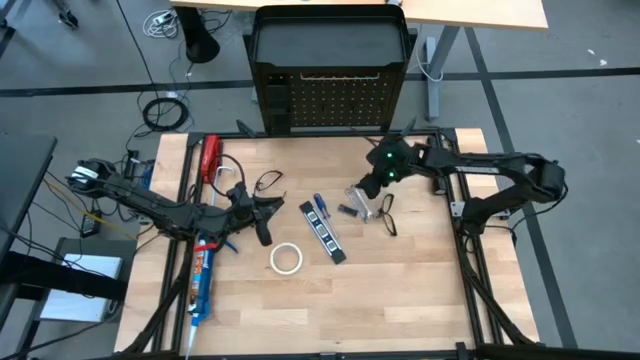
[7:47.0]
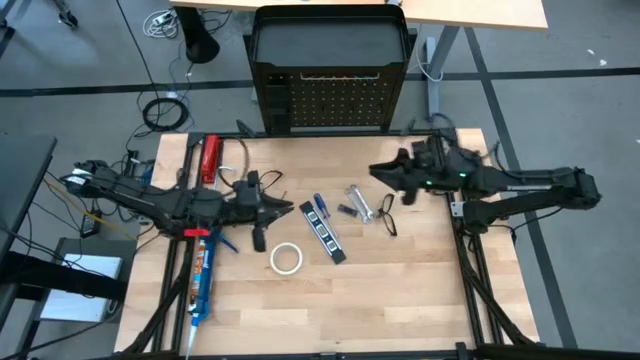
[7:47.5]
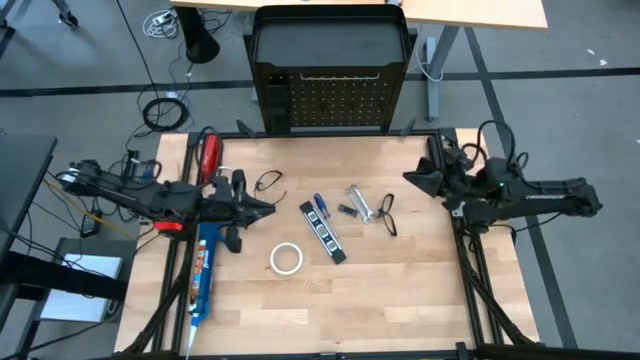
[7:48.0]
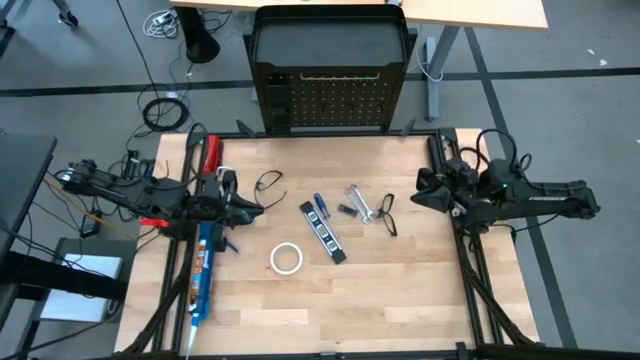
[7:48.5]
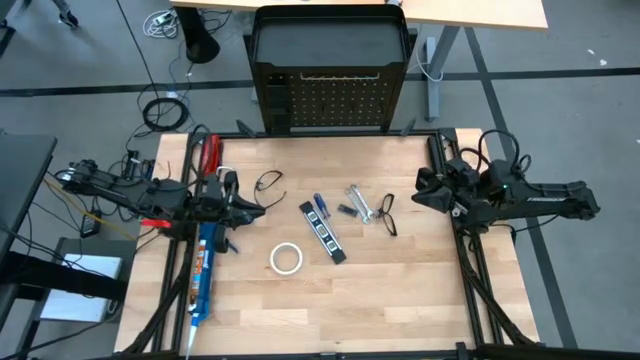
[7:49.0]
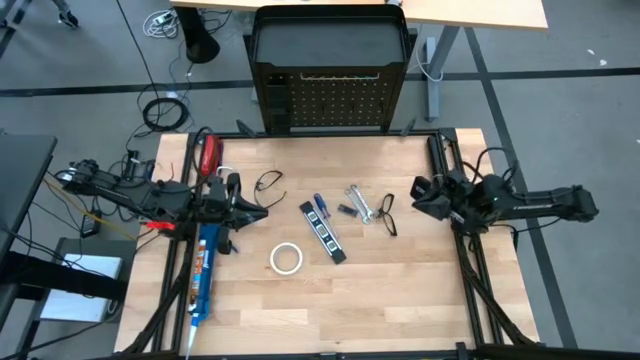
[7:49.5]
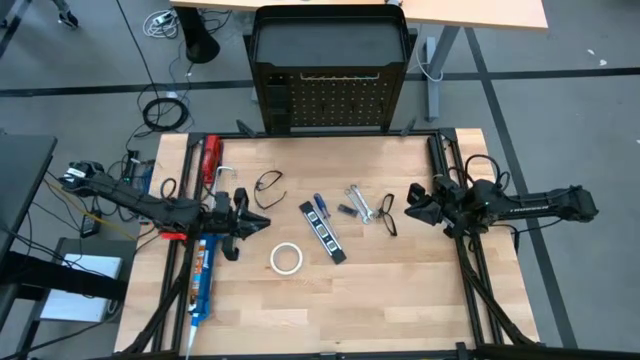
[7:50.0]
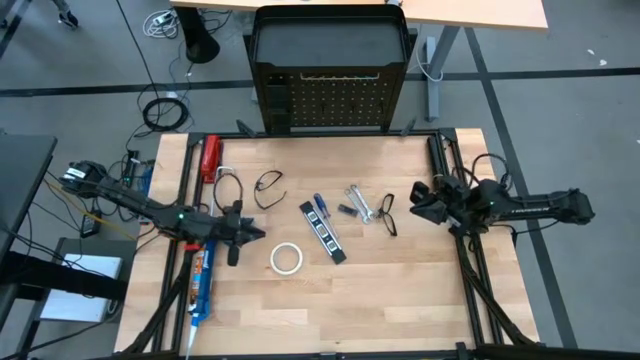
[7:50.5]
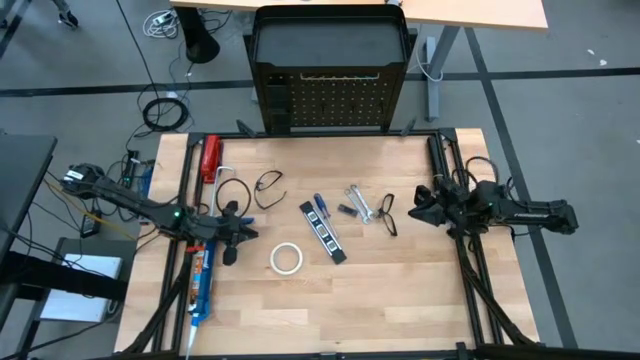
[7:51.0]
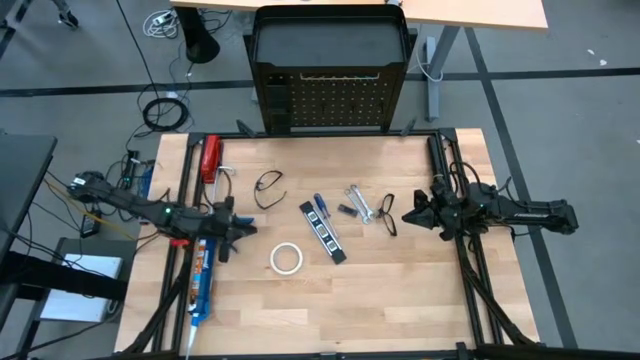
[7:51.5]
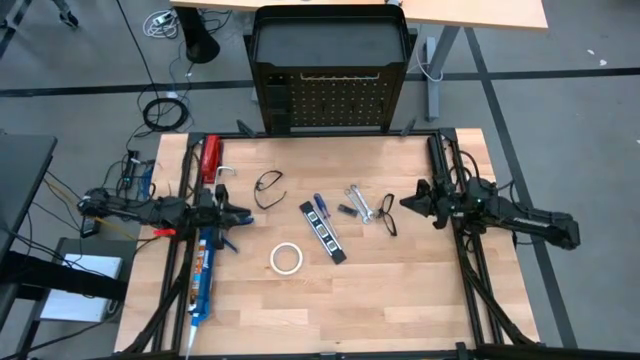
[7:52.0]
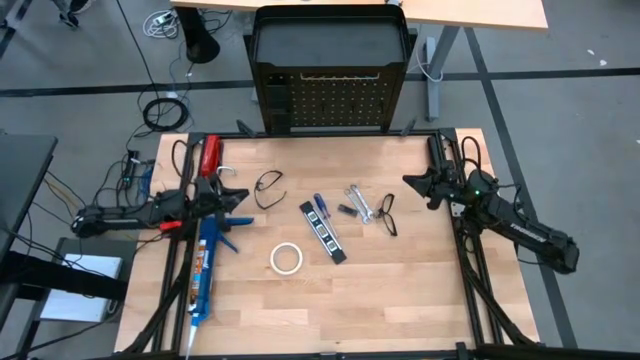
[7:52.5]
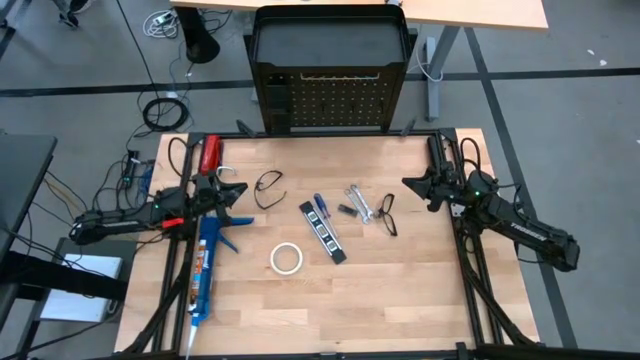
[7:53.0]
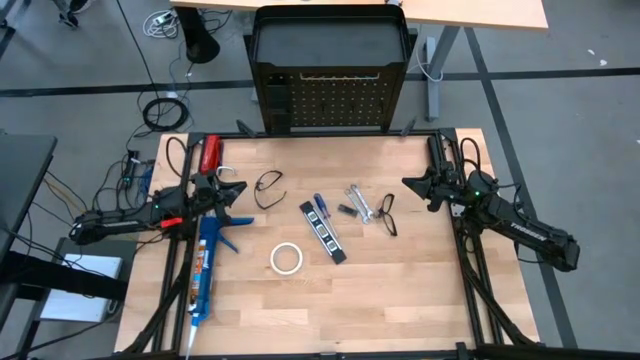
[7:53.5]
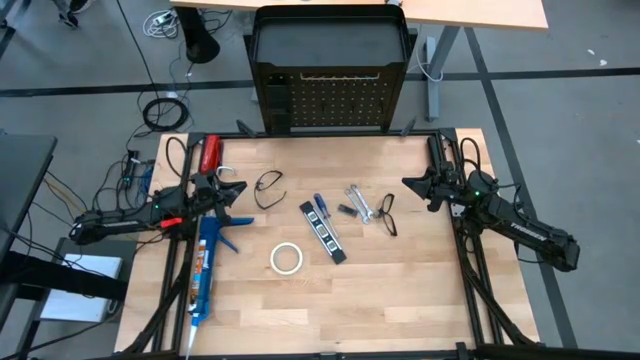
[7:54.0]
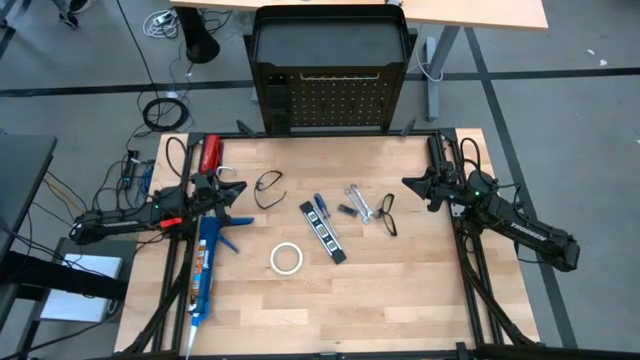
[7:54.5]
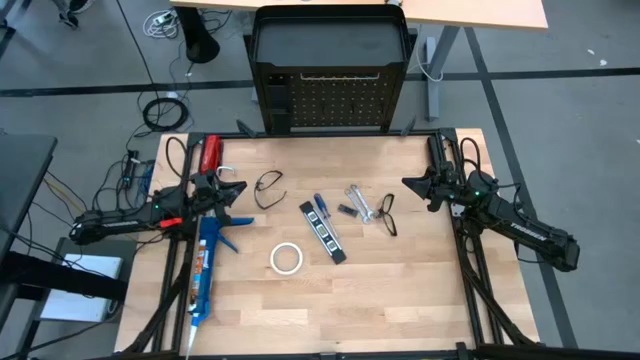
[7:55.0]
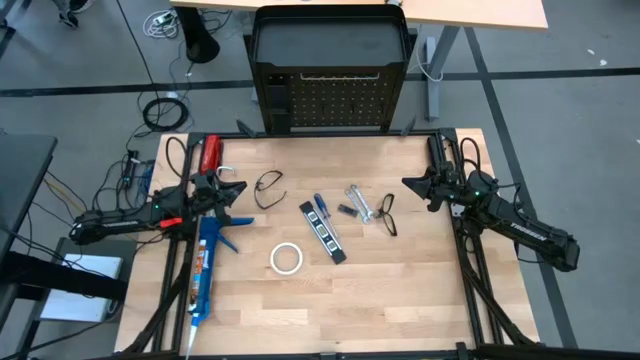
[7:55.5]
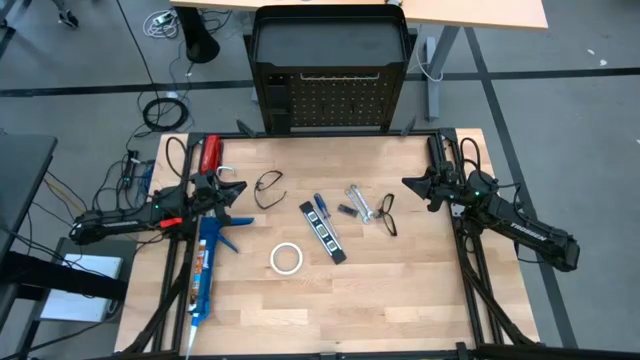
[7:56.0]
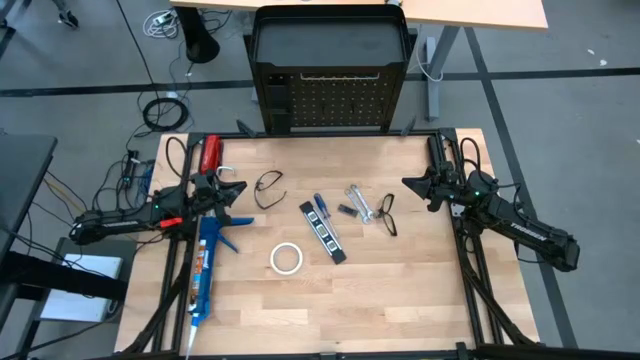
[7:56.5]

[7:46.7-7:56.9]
Task: Hang tools onto peg board
Return to Home Position

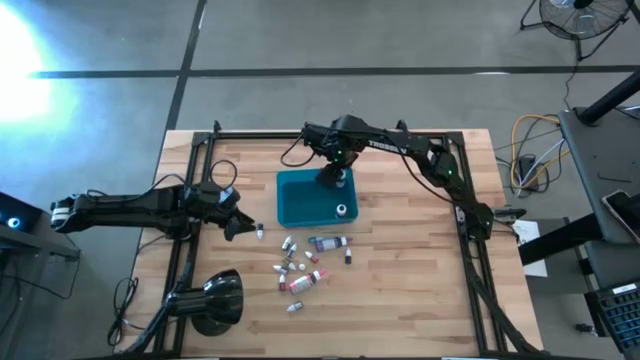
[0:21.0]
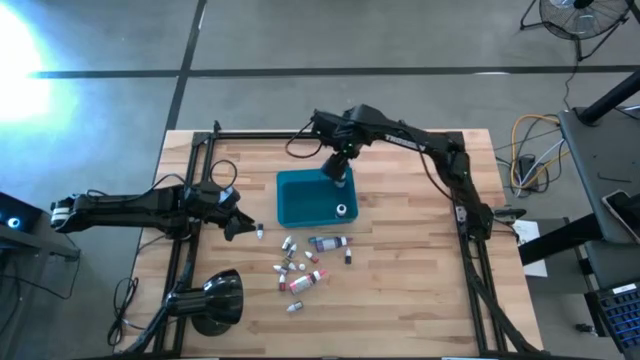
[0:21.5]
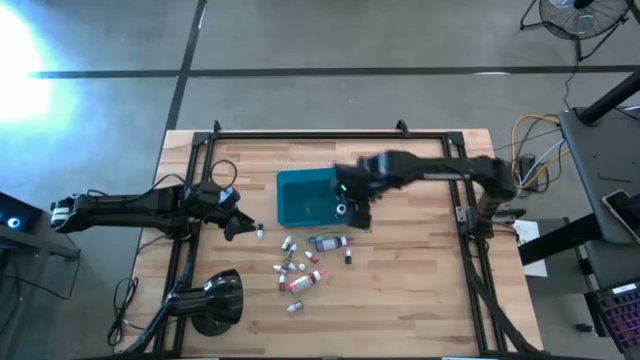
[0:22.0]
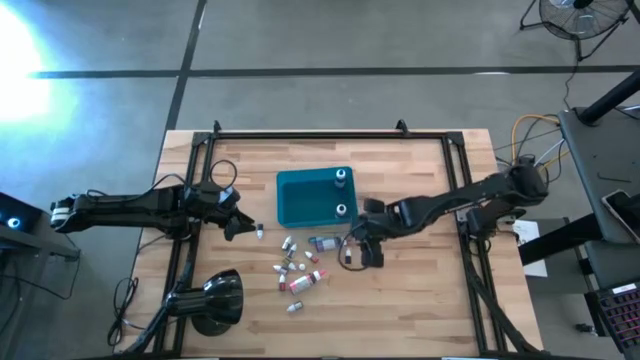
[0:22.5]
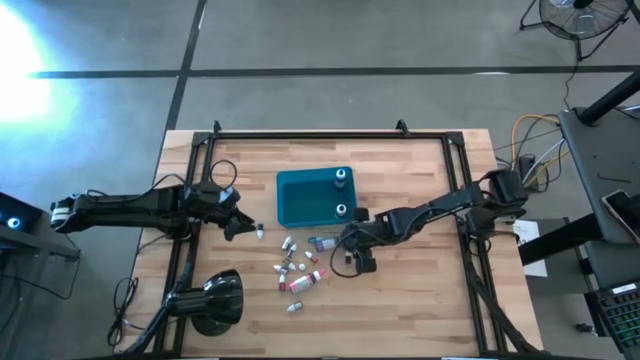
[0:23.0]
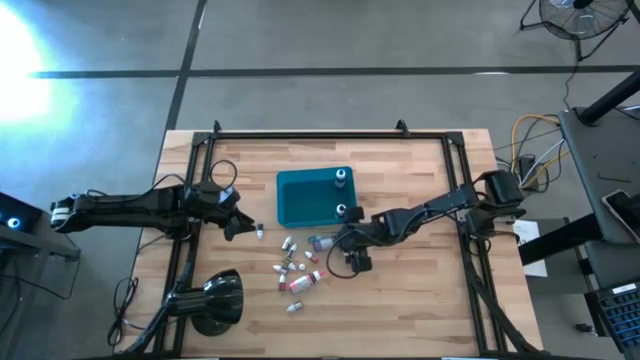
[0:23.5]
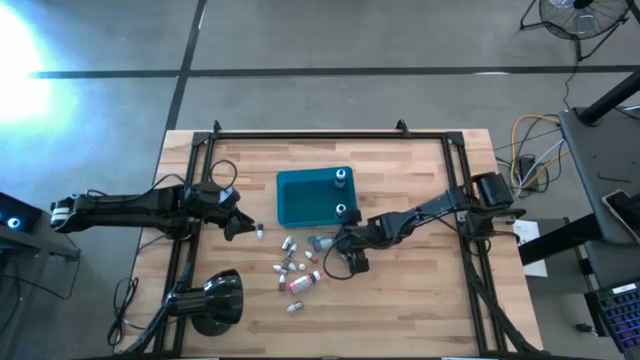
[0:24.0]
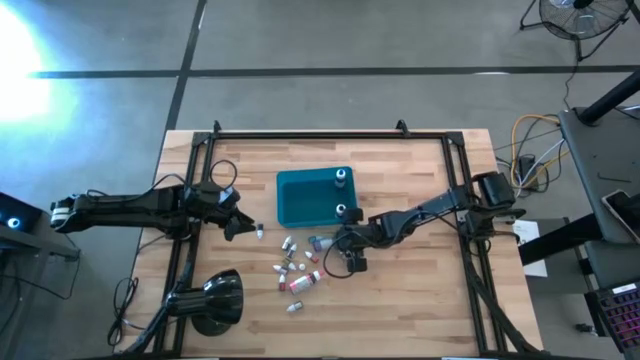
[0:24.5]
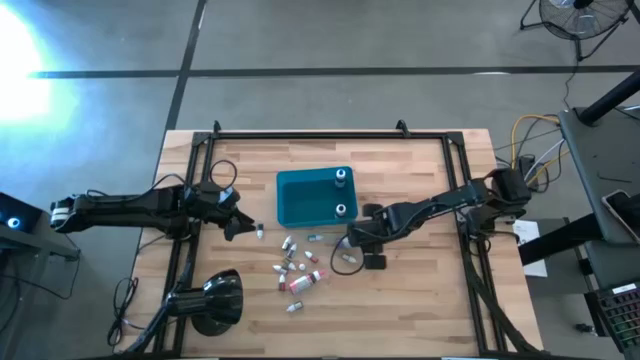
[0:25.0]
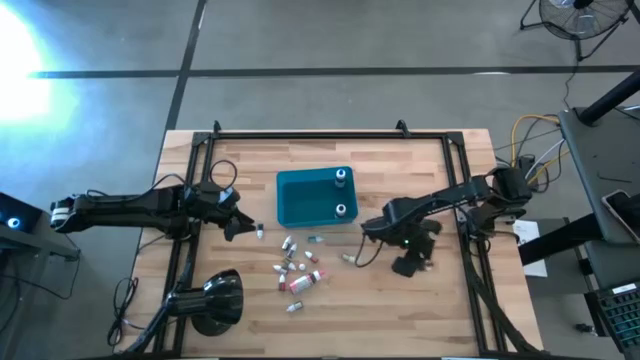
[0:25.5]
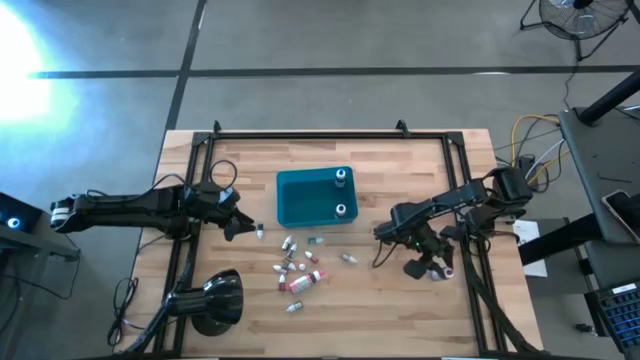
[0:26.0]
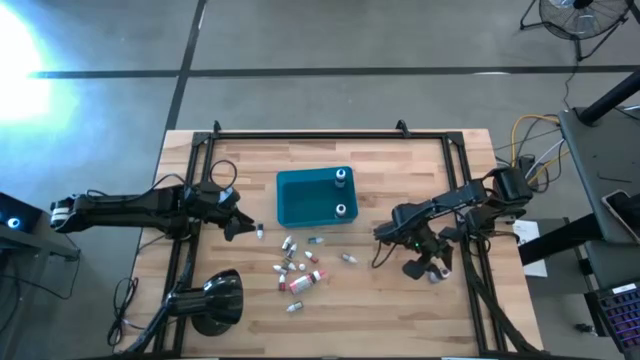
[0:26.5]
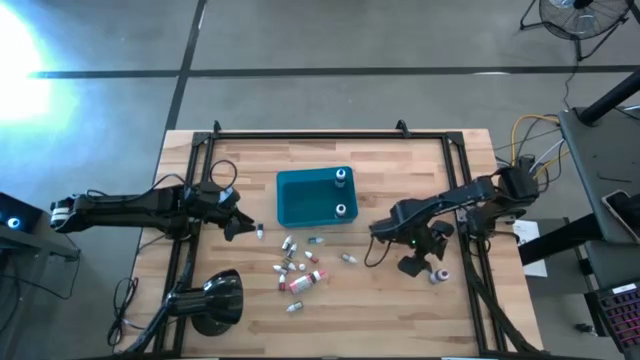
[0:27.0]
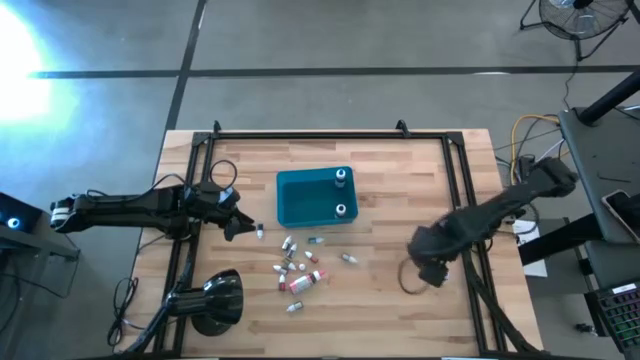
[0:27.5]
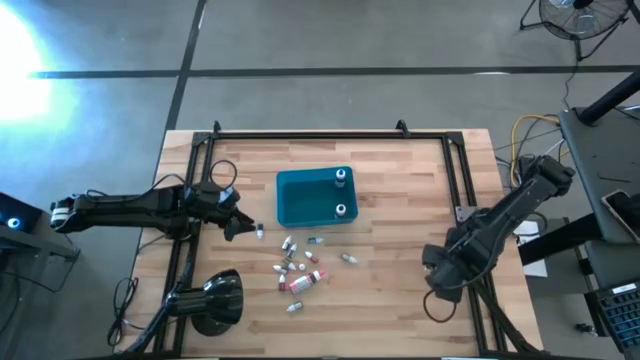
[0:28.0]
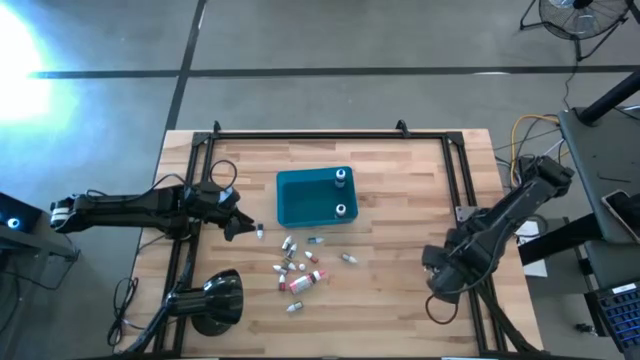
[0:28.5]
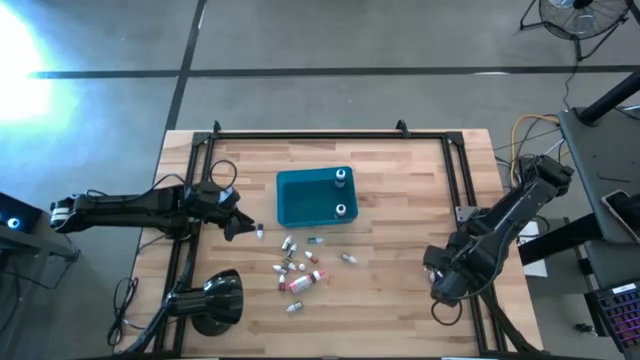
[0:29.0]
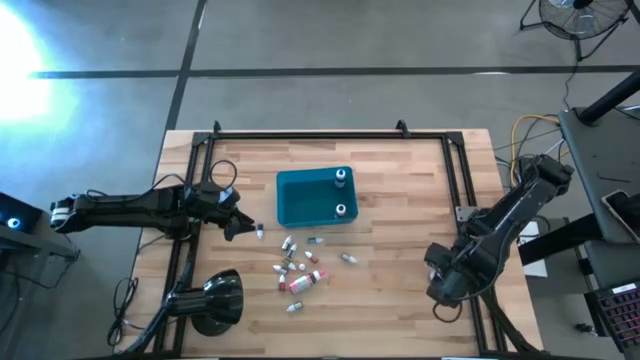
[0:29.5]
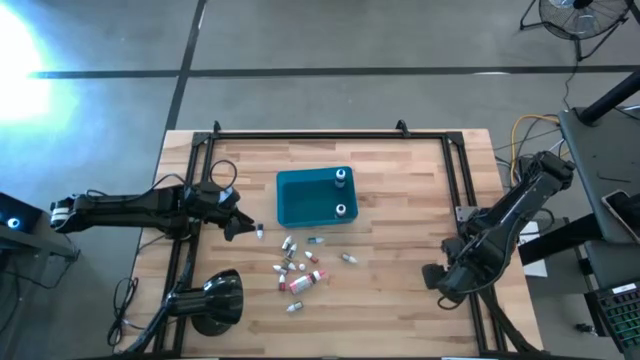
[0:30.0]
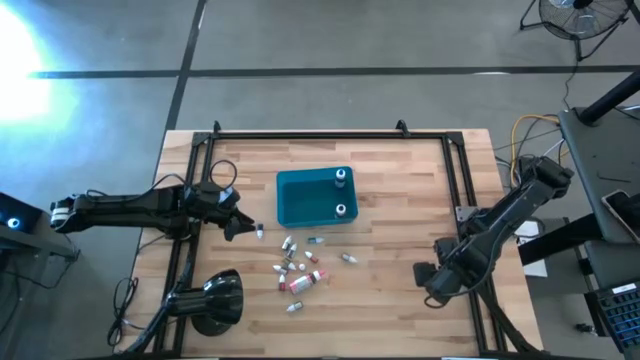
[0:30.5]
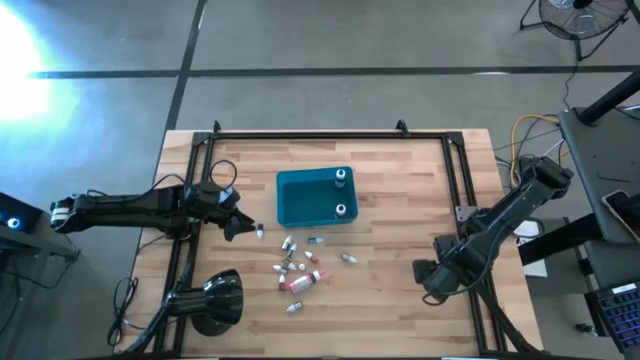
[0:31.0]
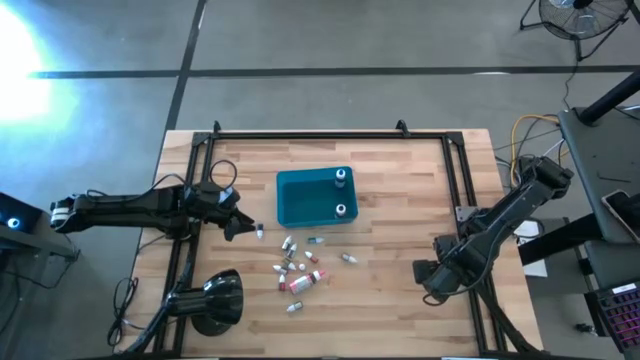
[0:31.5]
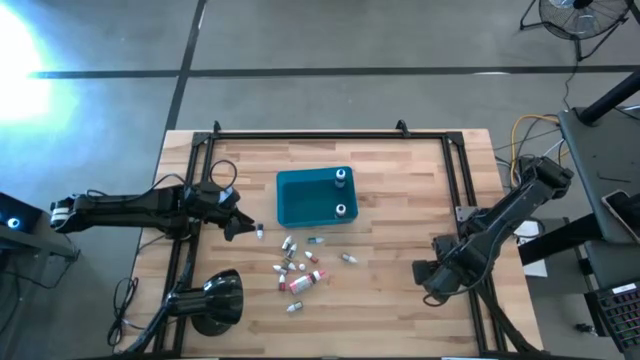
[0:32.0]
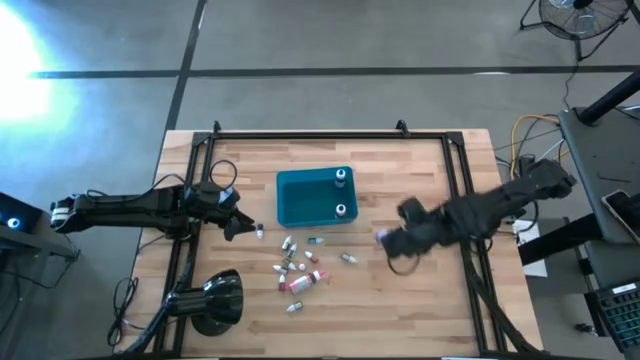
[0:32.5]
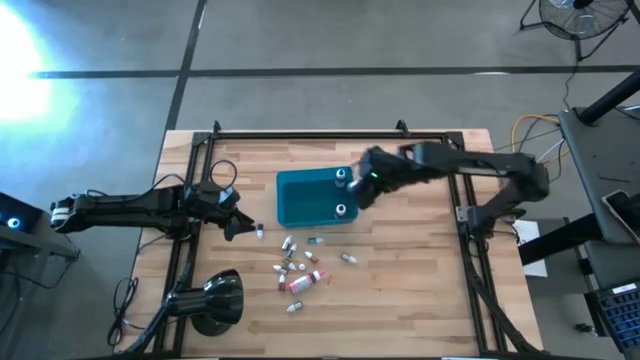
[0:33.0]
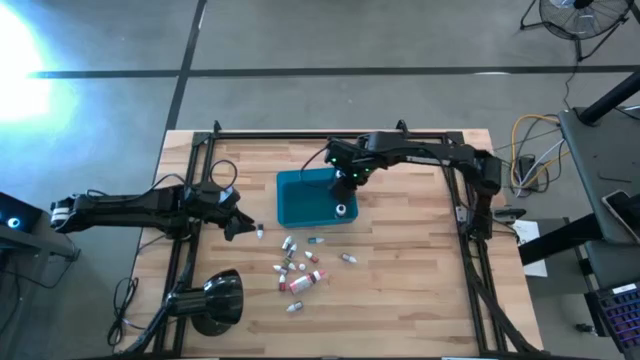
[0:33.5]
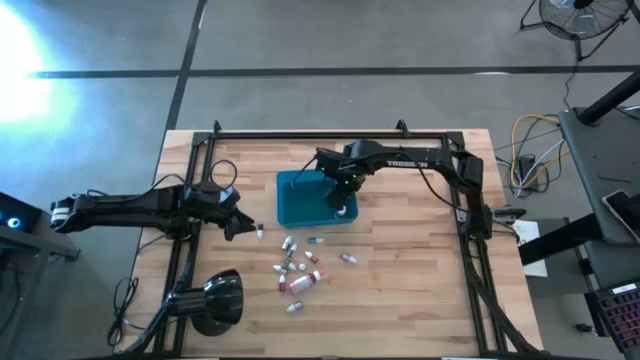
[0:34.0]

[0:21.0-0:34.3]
Task: Pick & Place food coloring
Put the large purple food coloring bottle into the blue bin
